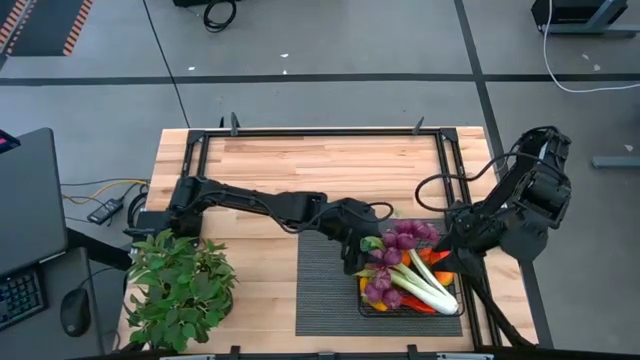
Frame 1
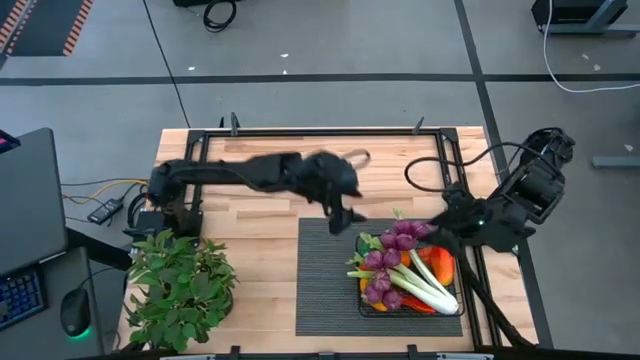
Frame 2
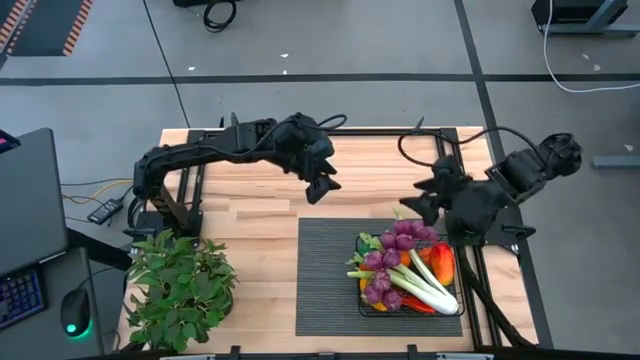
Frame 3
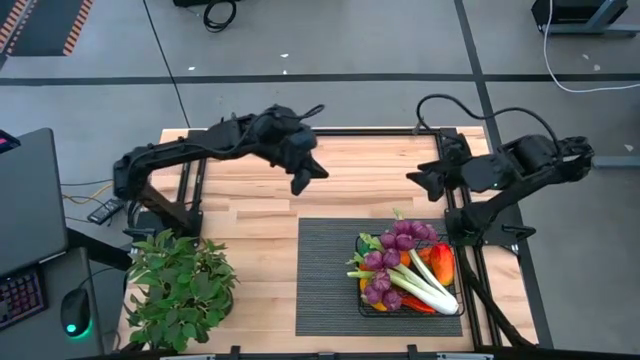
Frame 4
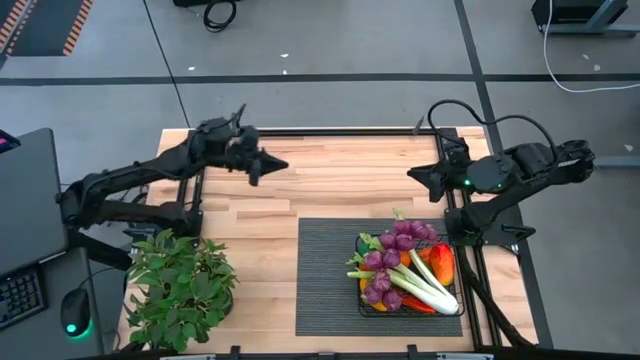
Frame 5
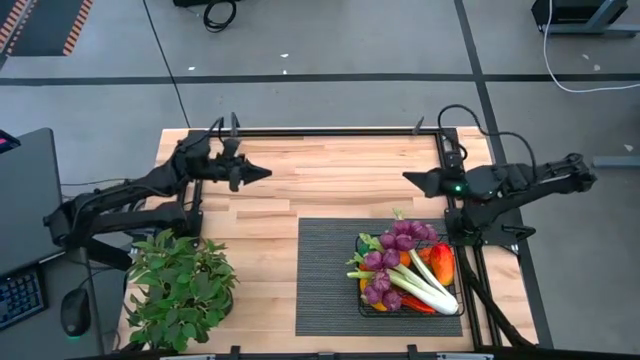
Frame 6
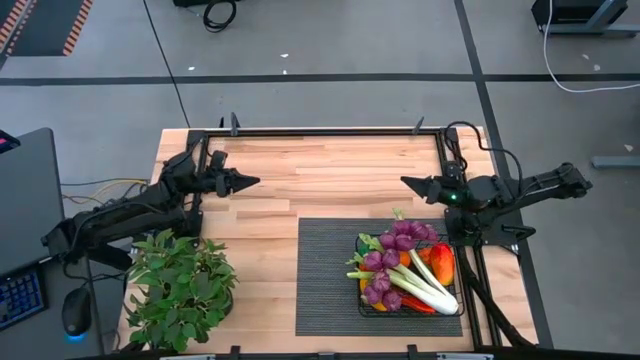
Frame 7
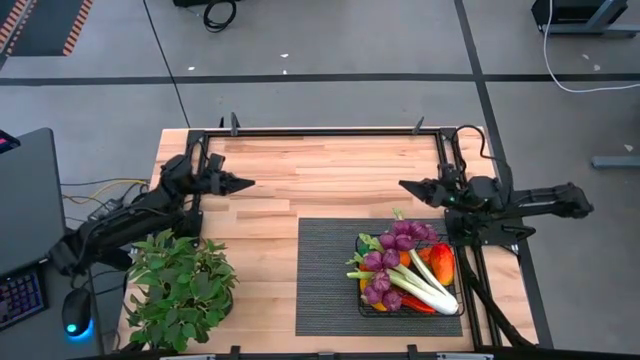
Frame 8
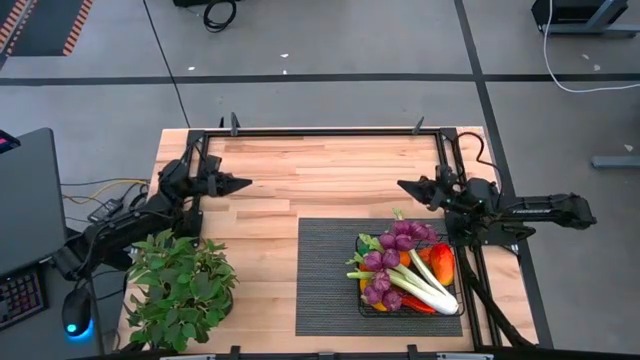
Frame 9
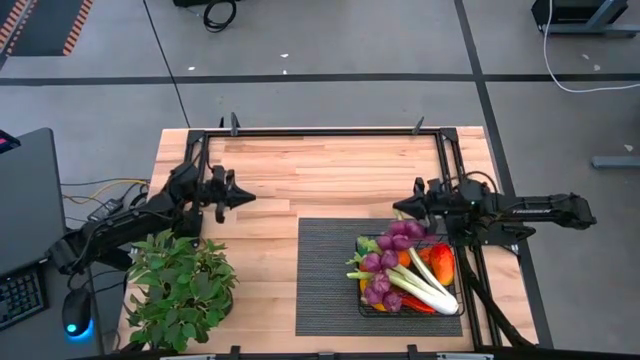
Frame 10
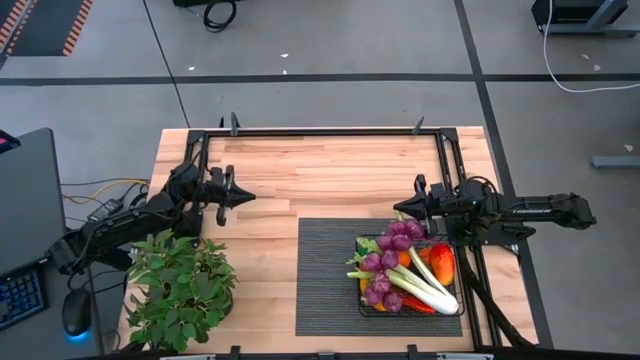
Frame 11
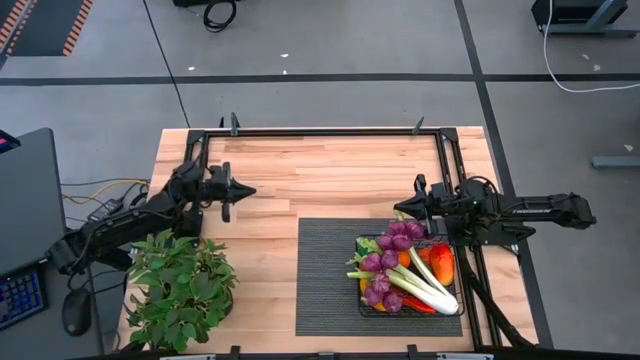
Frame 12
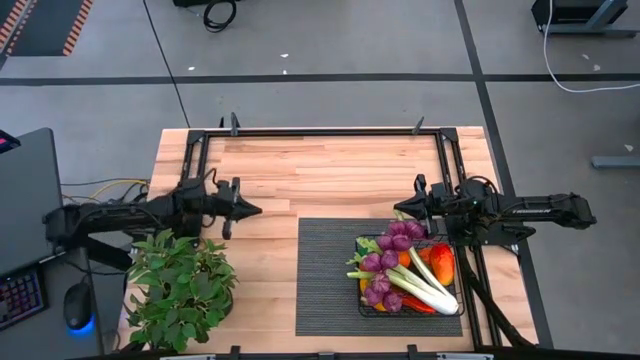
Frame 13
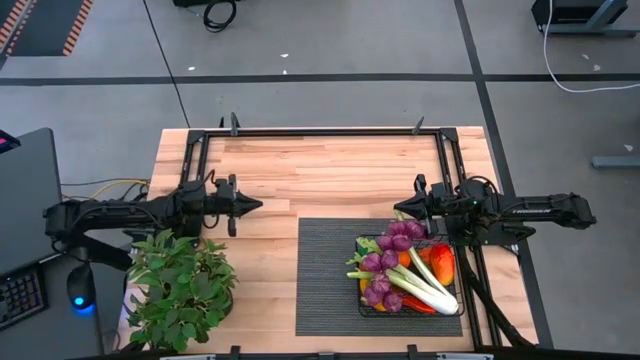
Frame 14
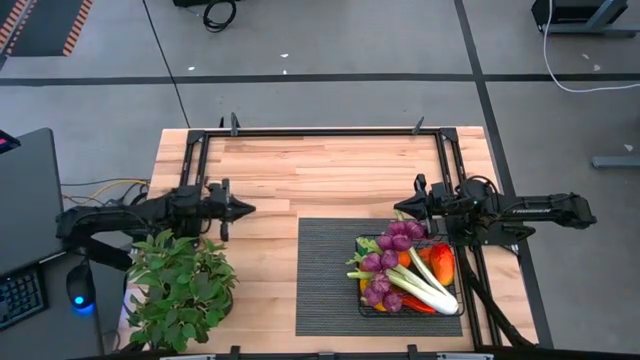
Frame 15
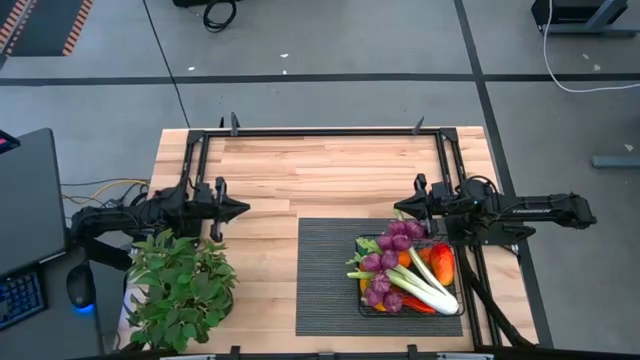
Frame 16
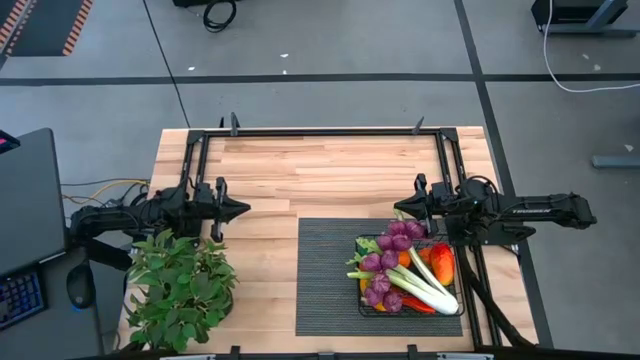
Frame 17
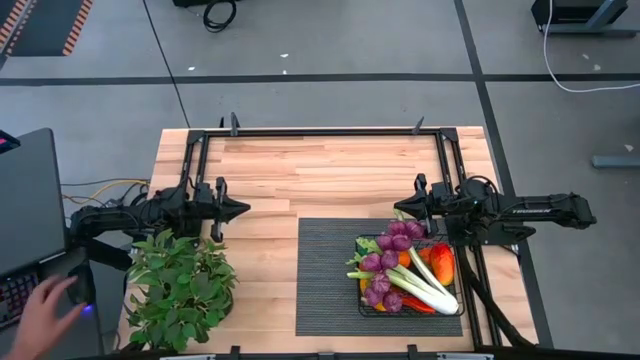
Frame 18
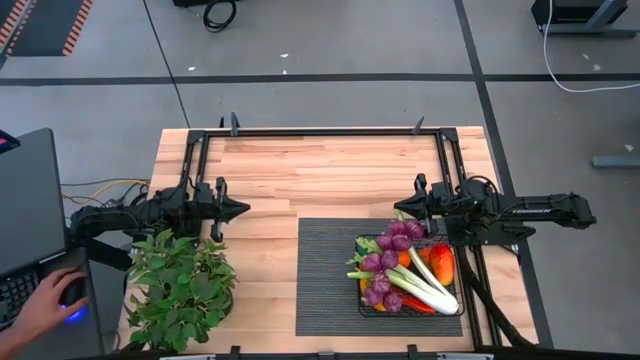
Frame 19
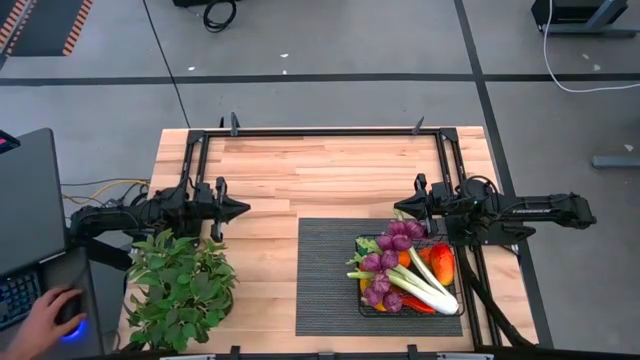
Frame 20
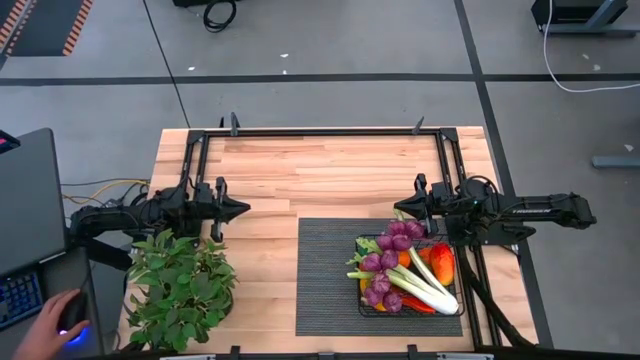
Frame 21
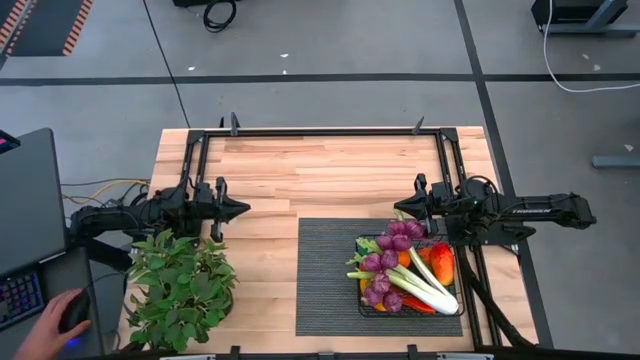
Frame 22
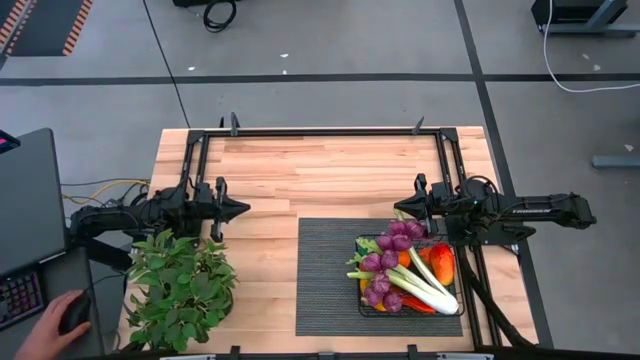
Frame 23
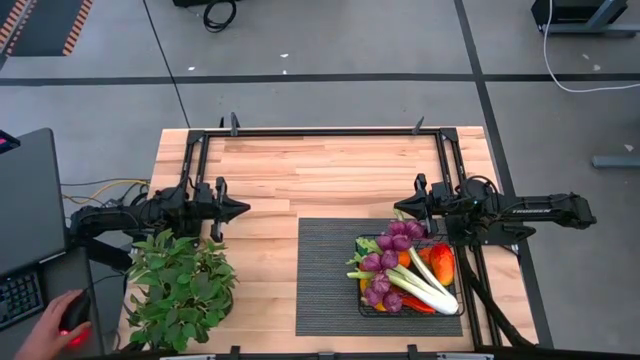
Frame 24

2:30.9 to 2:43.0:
Task: Build produce basket
Return to Home Position

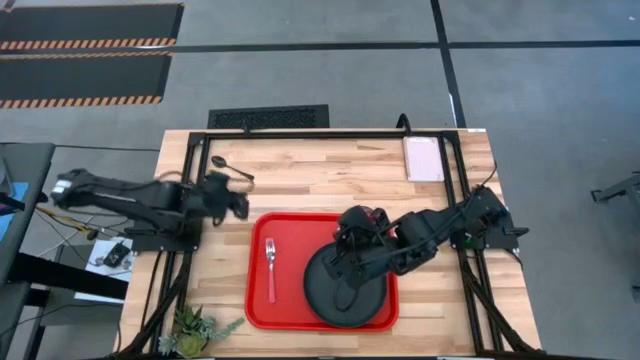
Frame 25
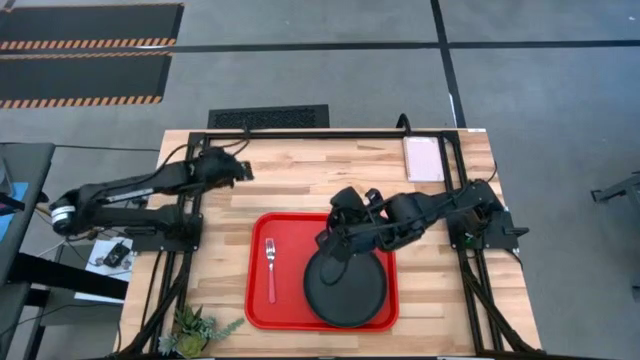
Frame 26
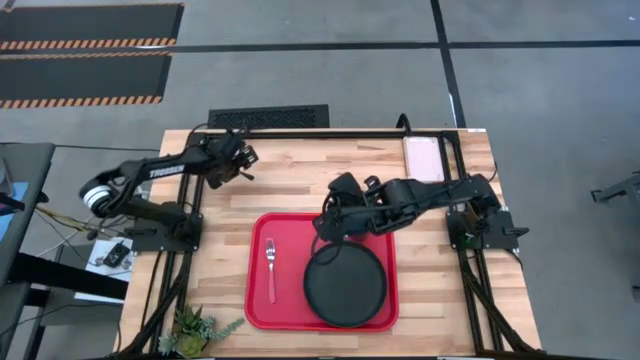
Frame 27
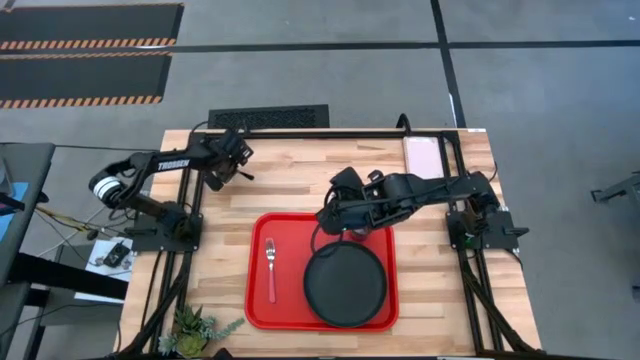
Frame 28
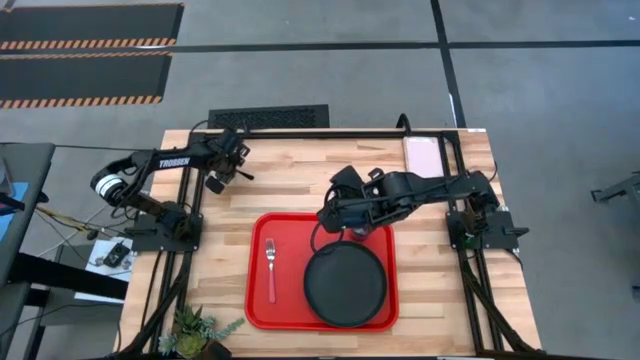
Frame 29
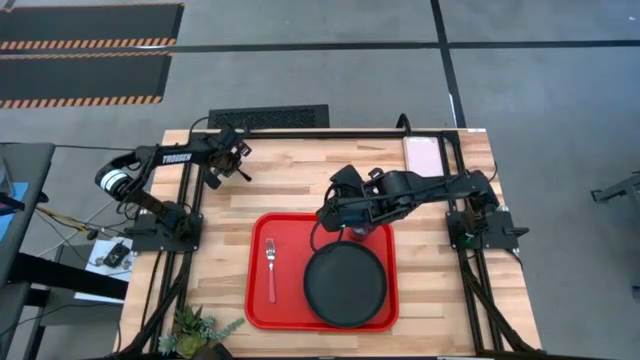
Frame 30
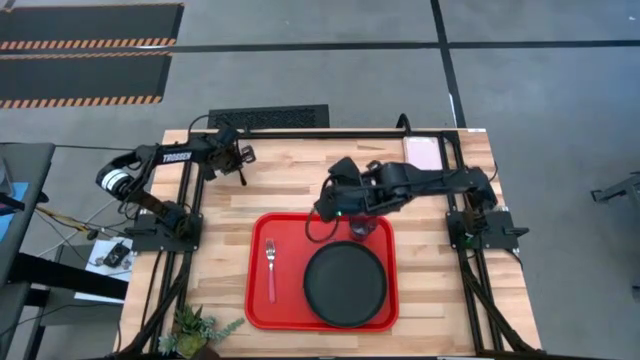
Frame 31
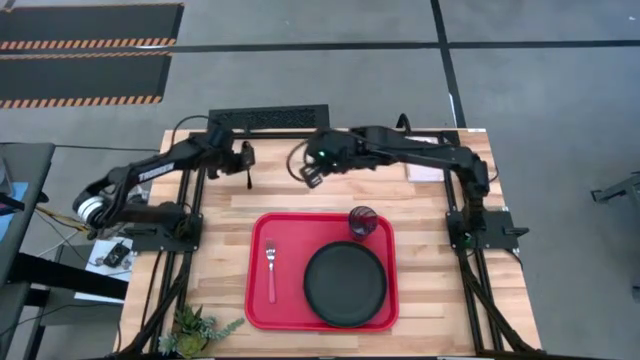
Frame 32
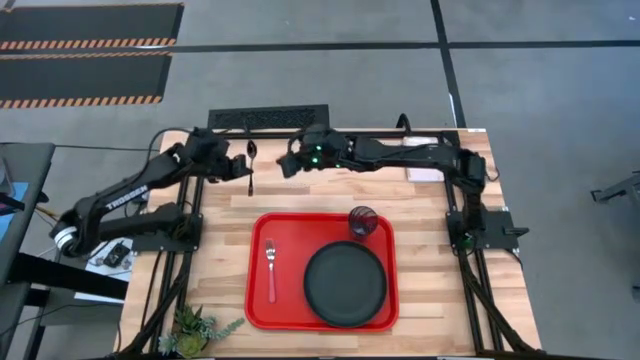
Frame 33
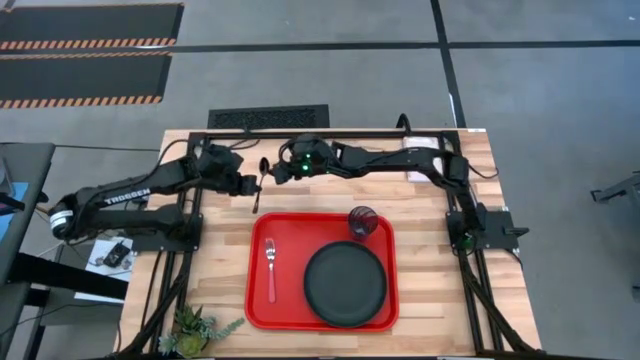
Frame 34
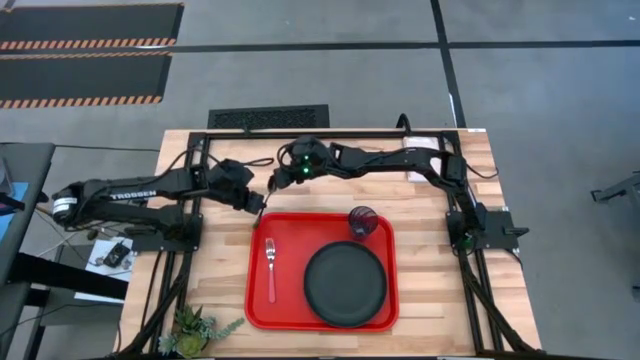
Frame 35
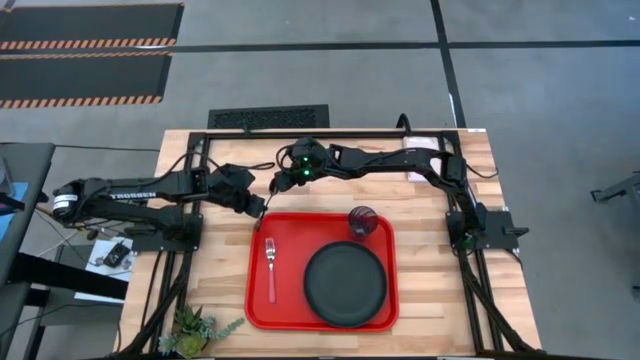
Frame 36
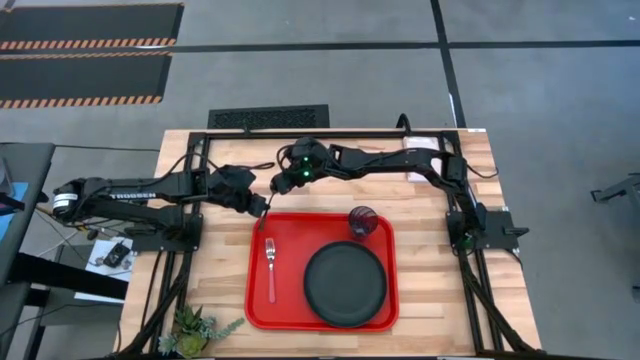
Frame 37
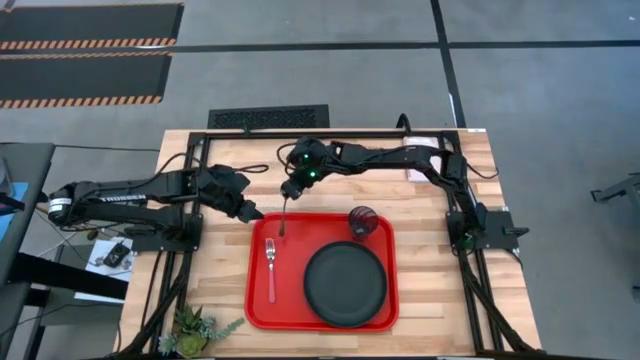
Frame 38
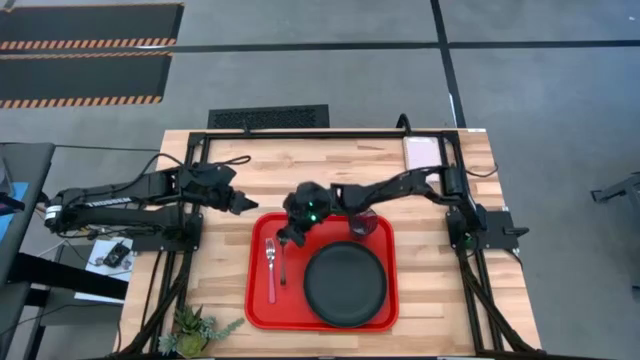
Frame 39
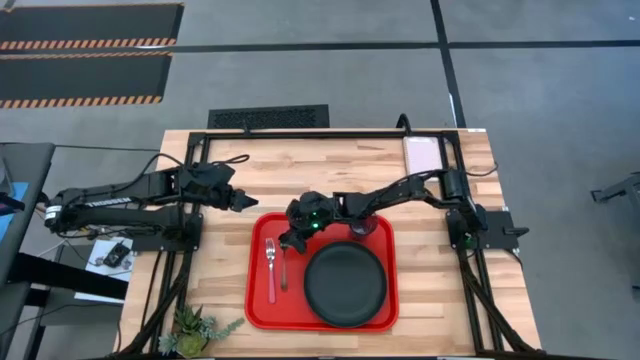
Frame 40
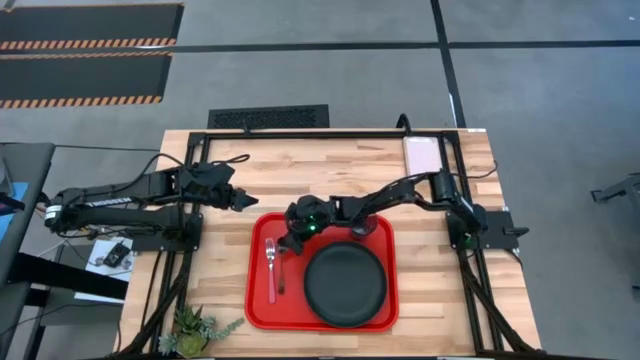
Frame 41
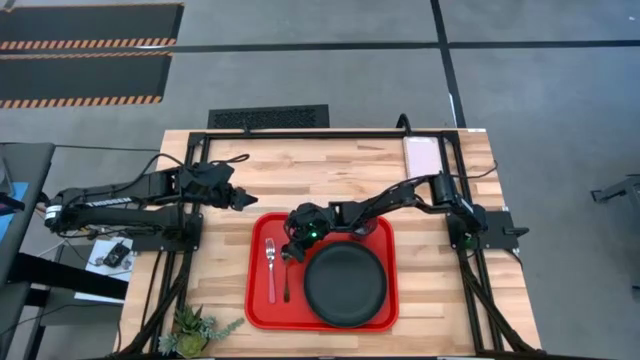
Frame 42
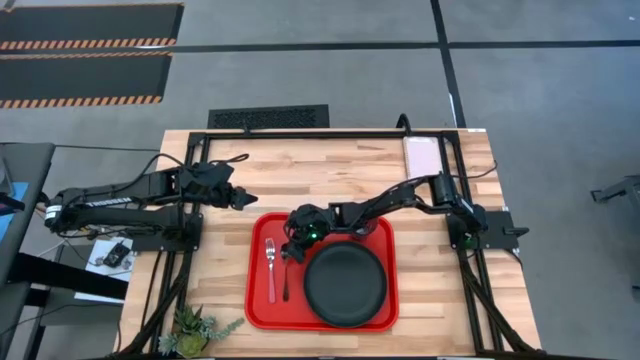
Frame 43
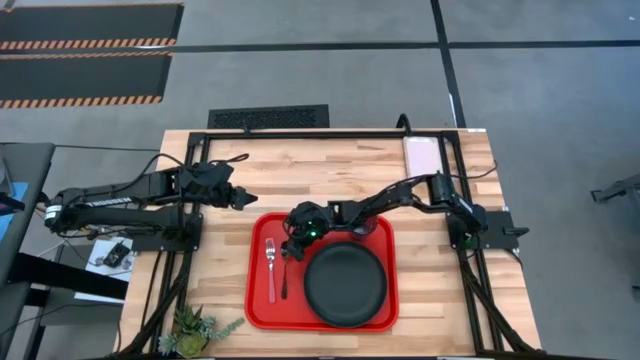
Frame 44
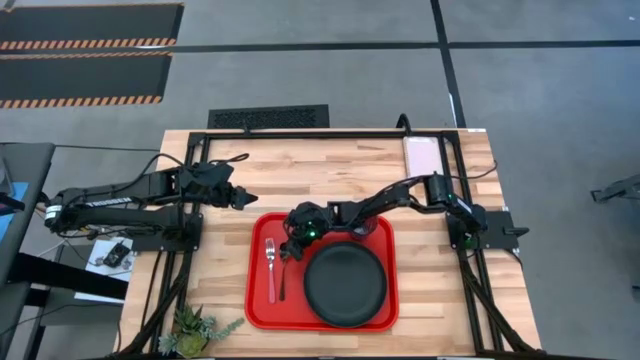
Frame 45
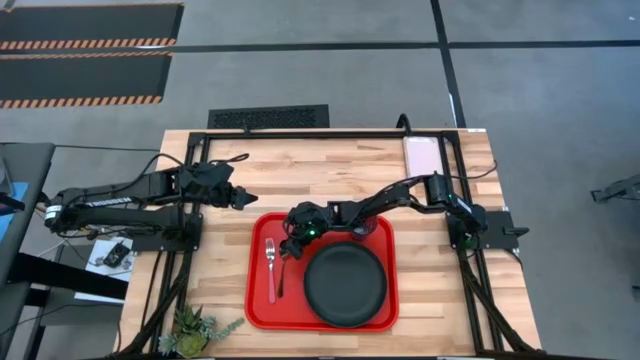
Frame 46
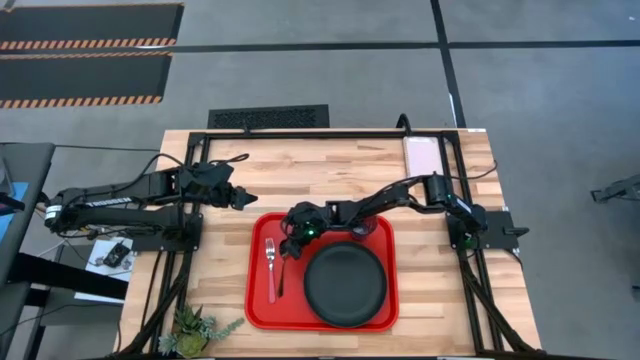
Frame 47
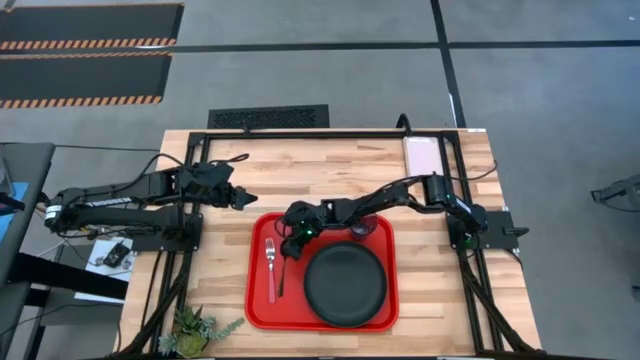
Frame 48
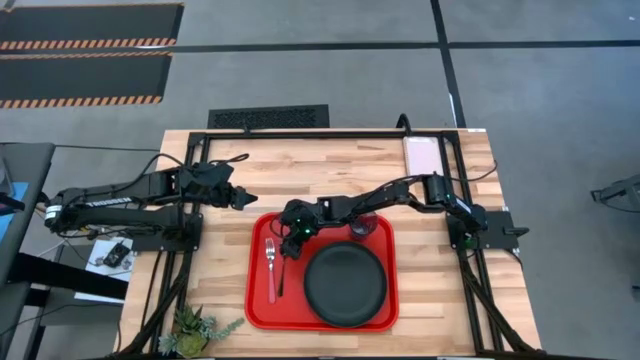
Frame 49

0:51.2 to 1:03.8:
Task: Pick and place plate/cup/fork/spoon on tray
Put the spoon into the red serving tray
